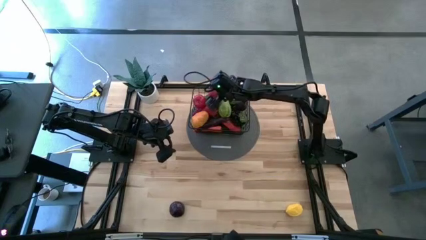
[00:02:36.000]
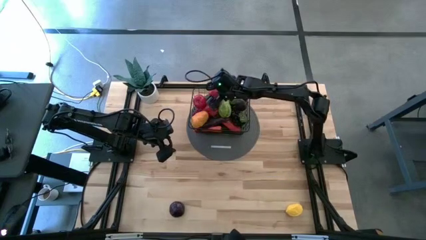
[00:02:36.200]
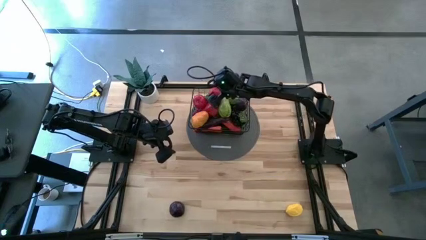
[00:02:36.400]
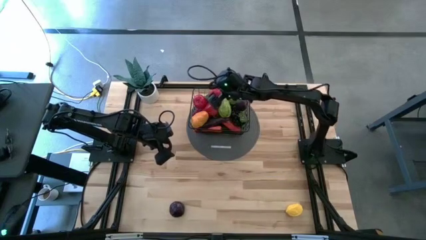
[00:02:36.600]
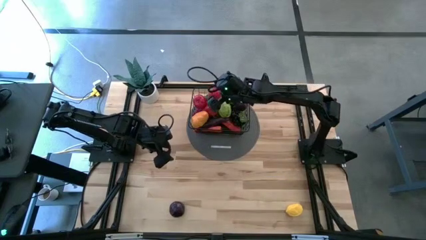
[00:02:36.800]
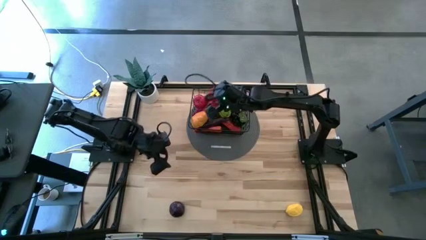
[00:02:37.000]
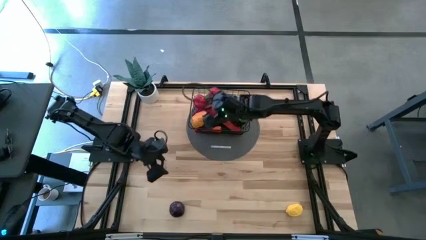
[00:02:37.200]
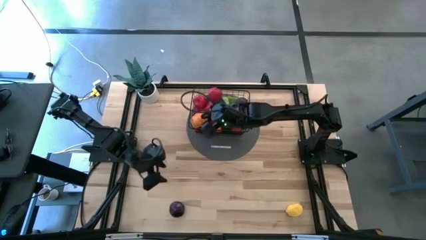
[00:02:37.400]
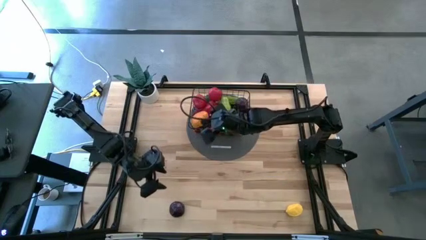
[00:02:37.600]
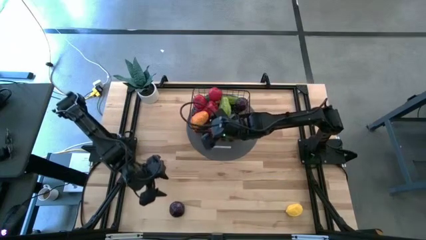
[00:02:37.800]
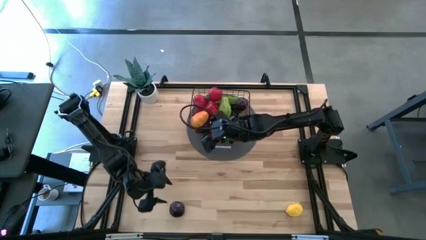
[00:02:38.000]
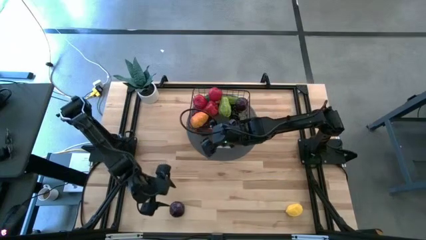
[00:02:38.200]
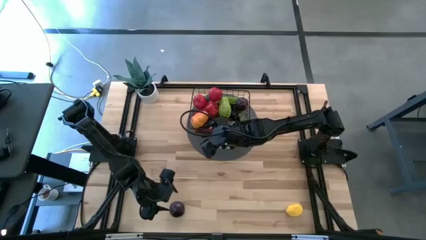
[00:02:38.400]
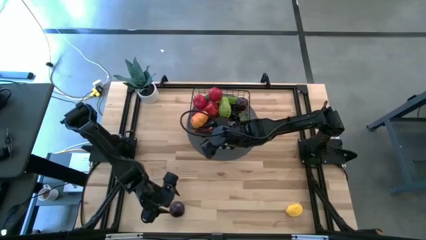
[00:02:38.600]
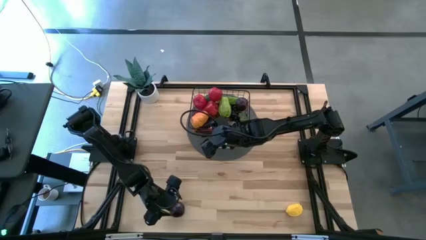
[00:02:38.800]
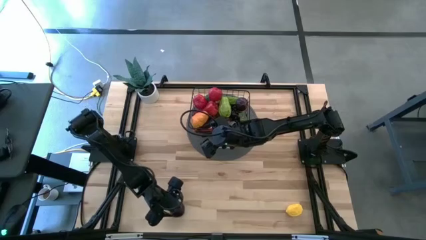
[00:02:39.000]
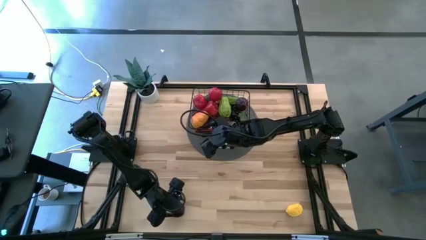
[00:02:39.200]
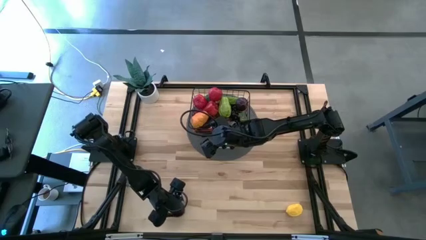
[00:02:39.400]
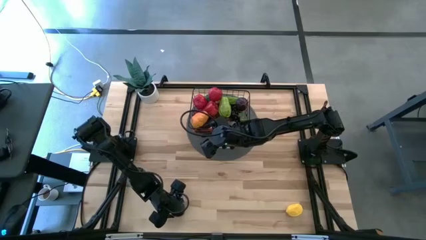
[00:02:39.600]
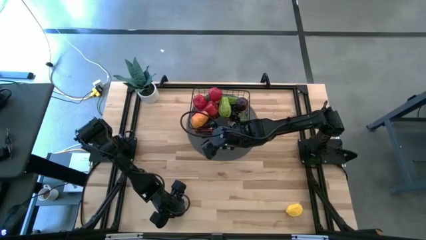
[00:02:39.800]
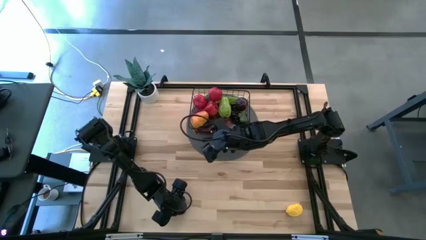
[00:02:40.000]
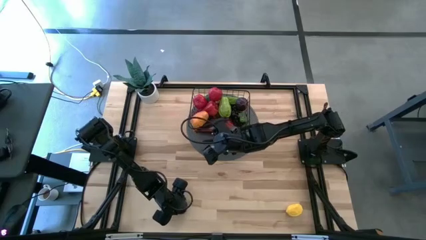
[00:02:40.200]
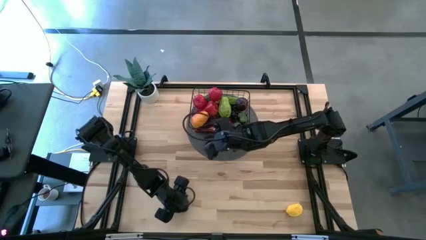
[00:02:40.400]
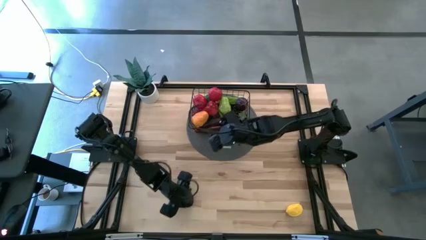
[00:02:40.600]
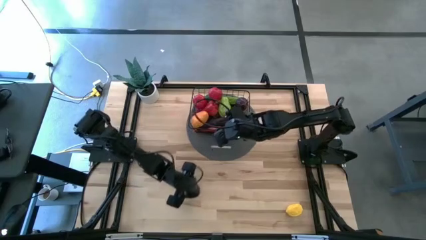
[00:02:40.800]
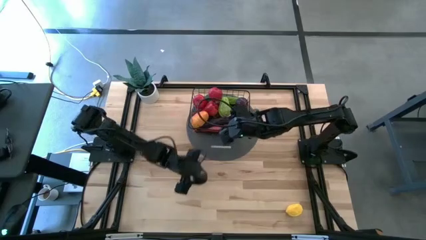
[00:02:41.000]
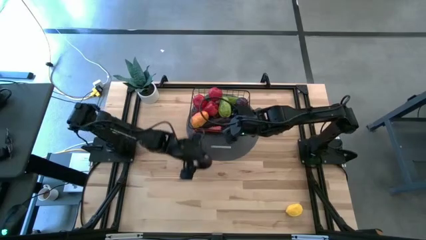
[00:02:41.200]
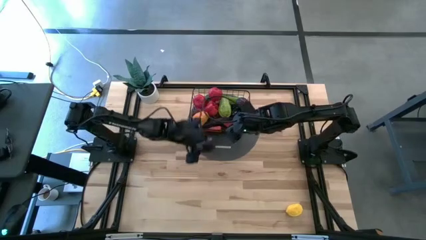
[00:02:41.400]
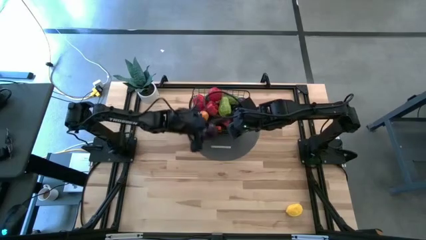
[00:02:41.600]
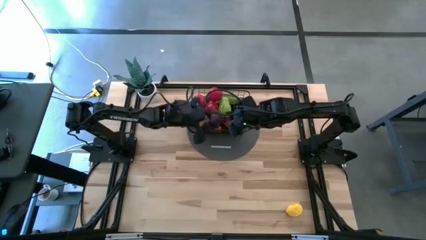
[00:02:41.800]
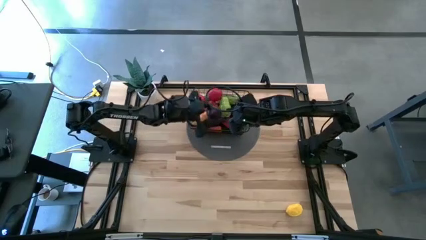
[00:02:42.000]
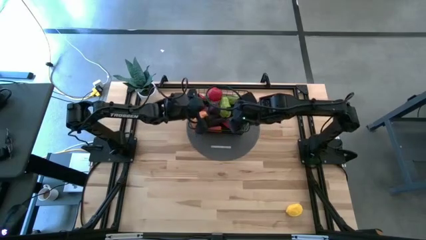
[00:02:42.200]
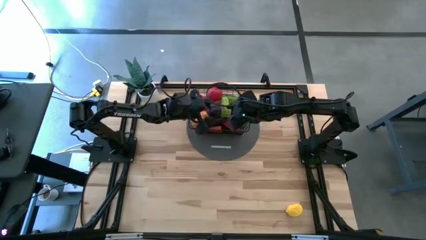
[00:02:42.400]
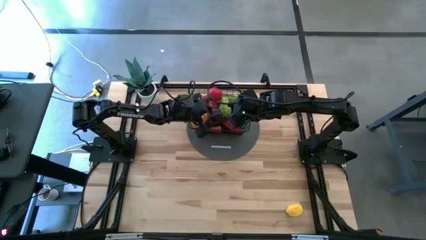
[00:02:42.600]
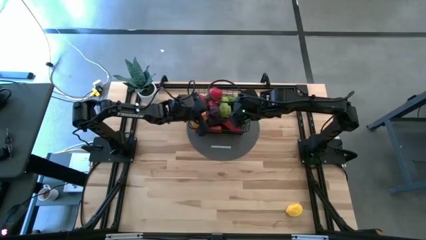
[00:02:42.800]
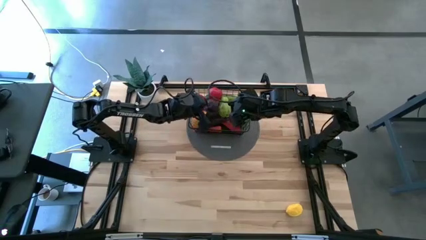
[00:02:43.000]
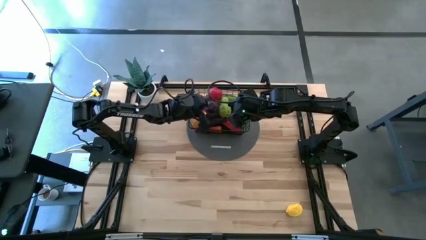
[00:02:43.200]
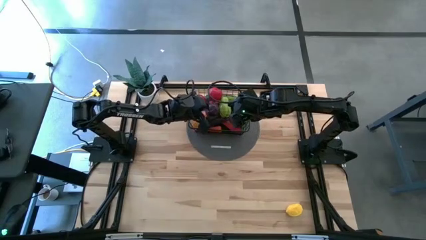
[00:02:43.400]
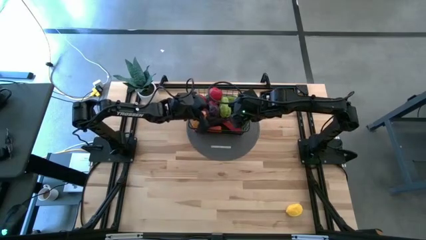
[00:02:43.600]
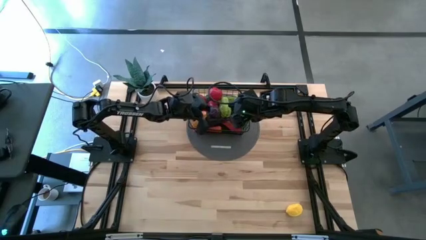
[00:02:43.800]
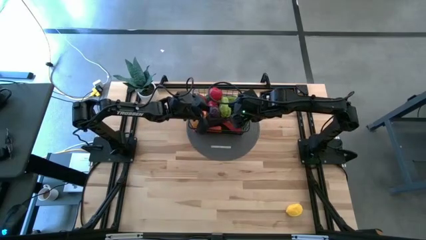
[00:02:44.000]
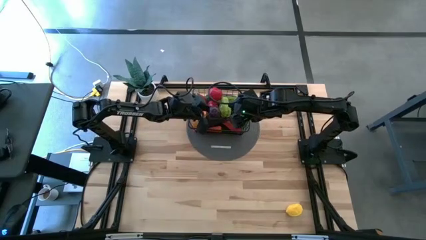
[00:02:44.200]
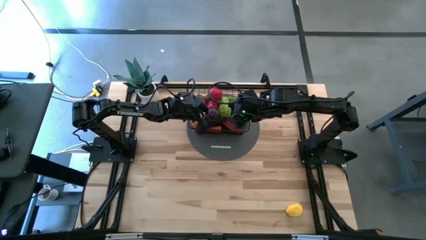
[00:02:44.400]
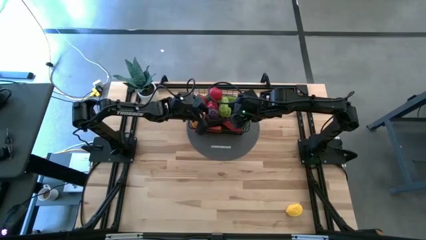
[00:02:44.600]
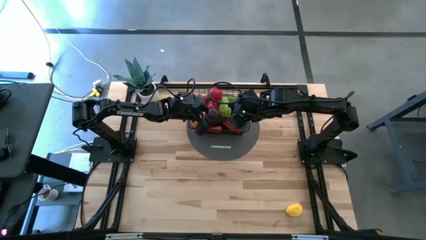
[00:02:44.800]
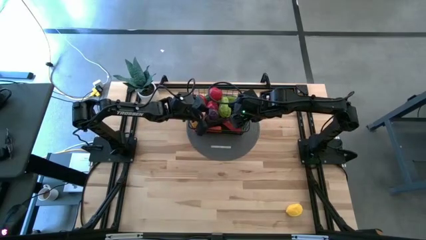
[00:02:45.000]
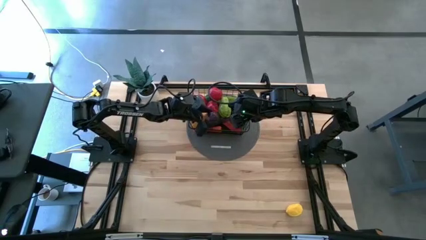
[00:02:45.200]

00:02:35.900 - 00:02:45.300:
Task: Build produce basket
Put the violet plum into the wire basket

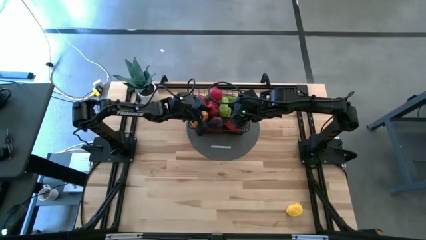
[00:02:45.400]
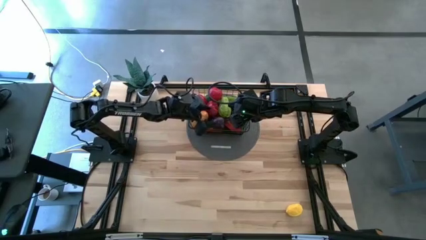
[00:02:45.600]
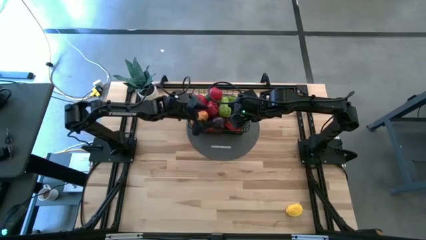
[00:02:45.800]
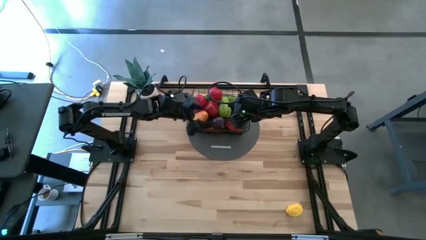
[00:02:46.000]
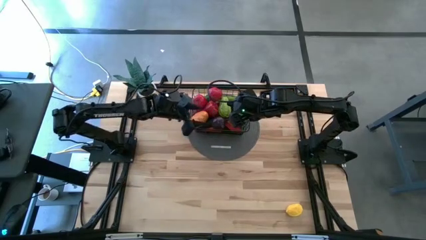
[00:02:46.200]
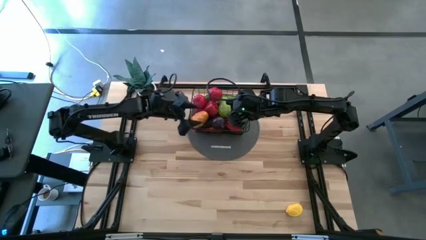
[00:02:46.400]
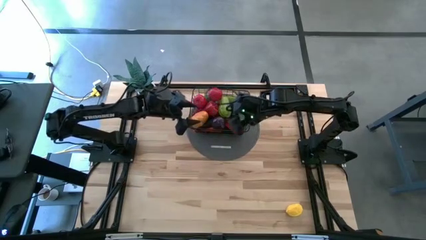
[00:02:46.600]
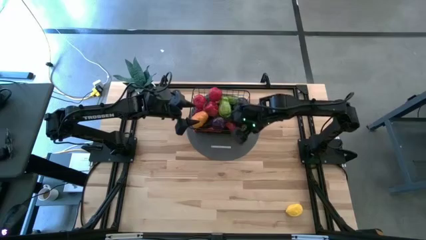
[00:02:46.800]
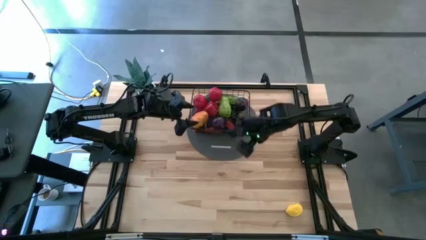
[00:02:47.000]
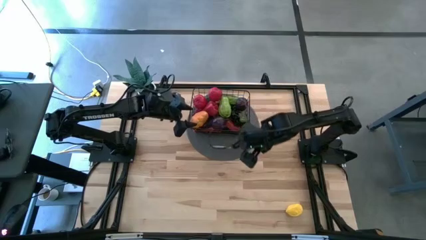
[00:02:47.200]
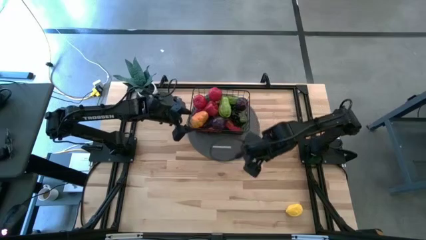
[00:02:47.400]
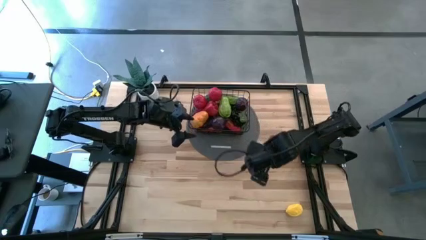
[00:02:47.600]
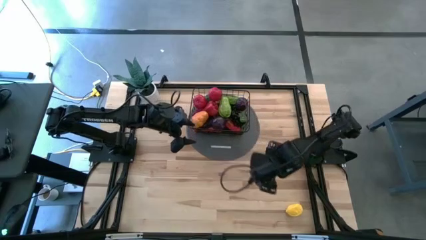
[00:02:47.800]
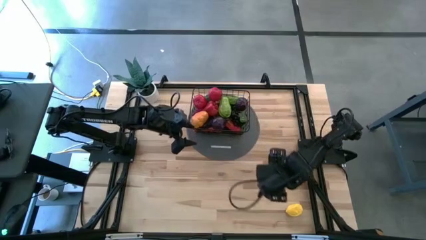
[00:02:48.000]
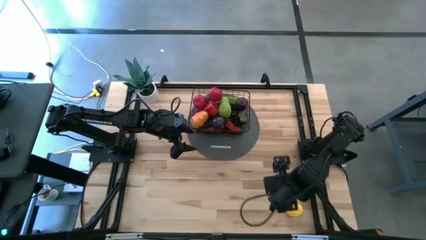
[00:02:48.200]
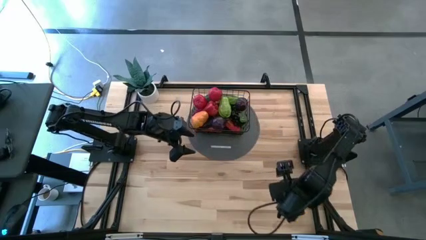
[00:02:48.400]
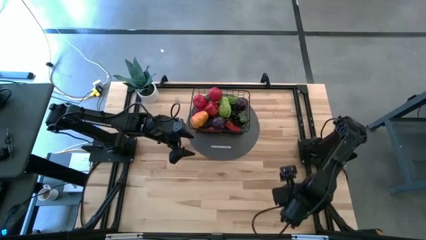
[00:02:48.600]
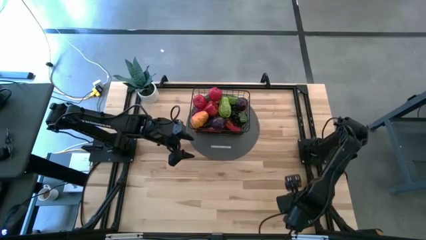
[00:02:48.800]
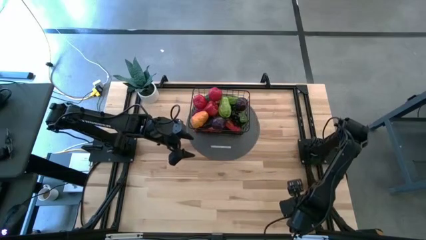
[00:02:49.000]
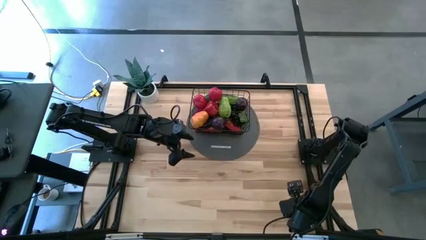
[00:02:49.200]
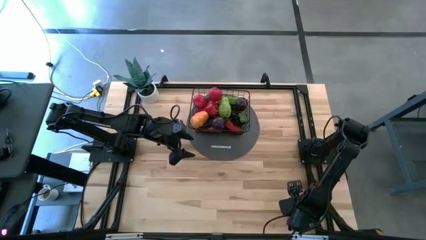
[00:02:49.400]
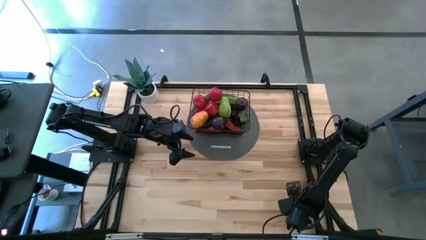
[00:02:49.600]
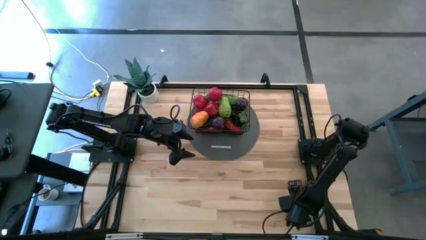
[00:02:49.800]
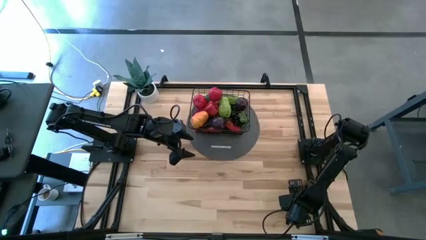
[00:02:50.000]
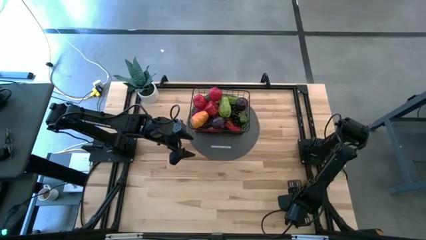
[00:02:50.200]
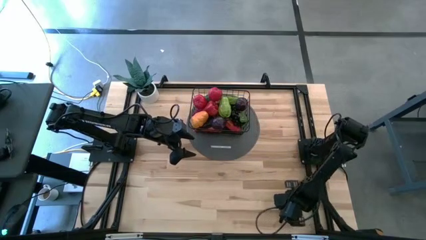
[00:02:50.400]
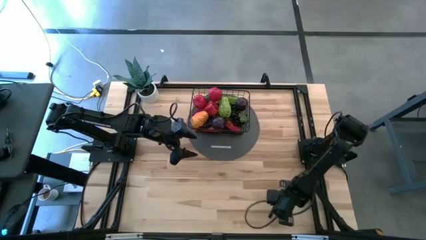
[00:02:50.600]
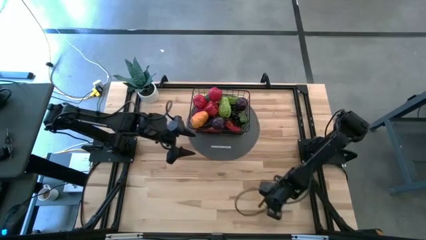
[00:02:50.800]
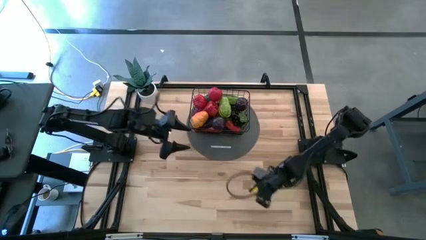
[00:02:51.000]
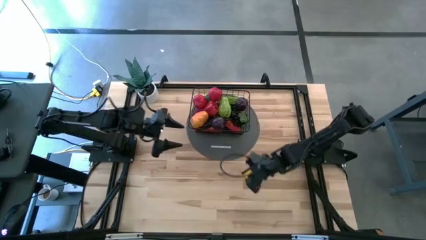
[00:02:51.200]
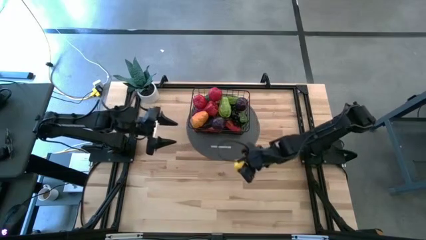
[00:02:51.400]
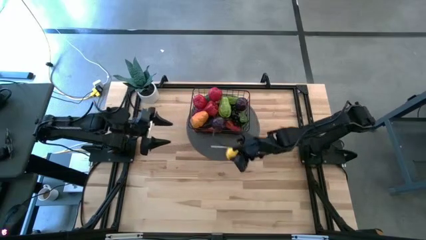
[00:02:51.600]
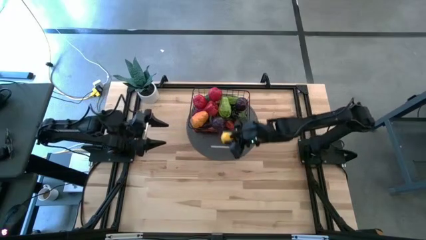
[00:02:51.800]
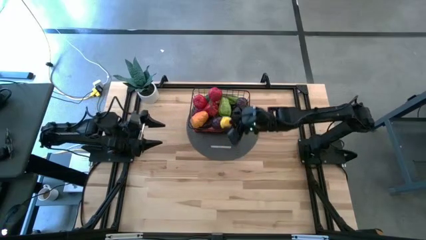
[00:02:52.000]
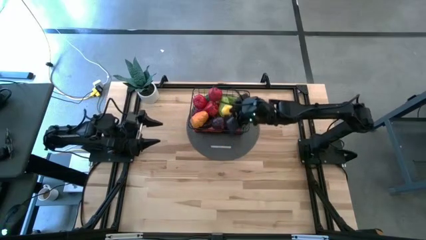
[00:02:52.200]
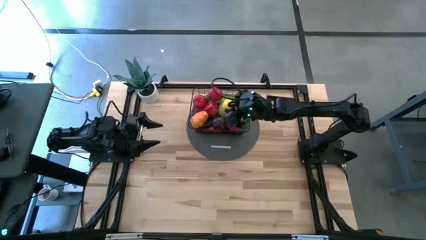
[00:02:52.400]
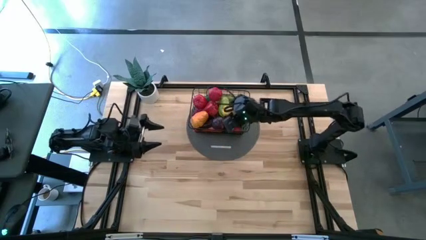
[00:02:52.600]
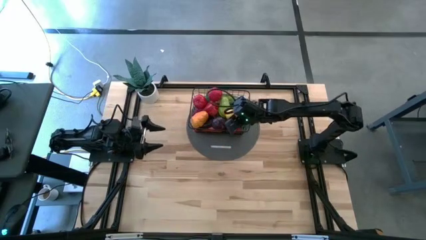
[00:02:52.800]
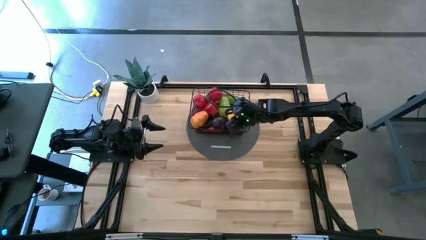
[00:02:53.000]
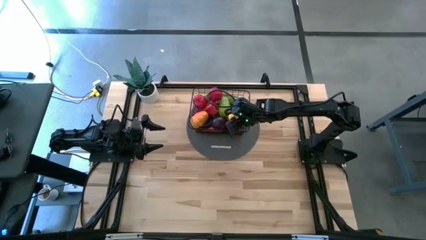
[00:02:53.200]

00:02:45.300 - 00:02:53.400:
Put the yellow lemon into the wire basket
